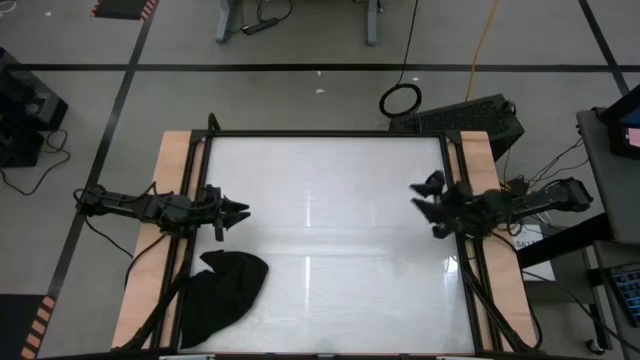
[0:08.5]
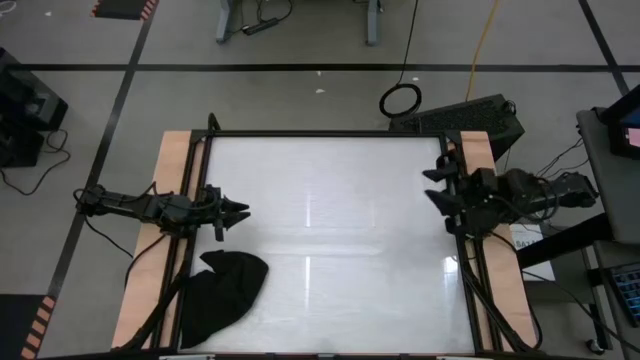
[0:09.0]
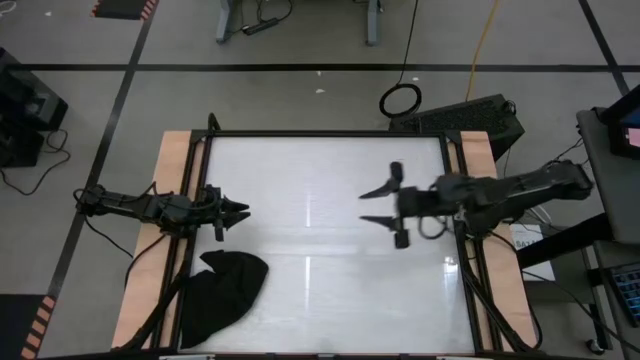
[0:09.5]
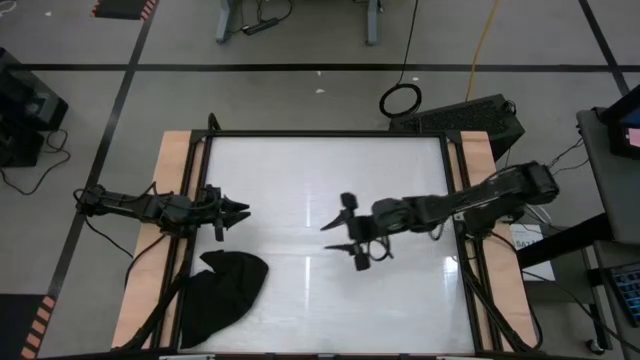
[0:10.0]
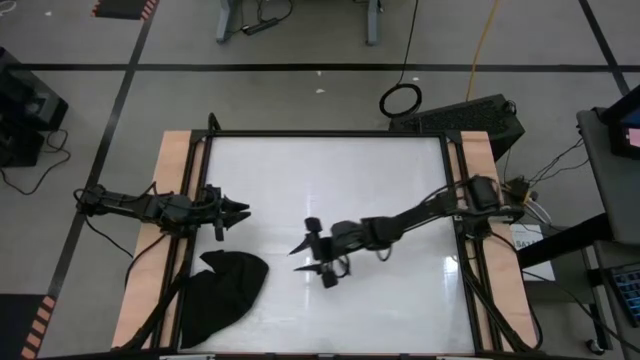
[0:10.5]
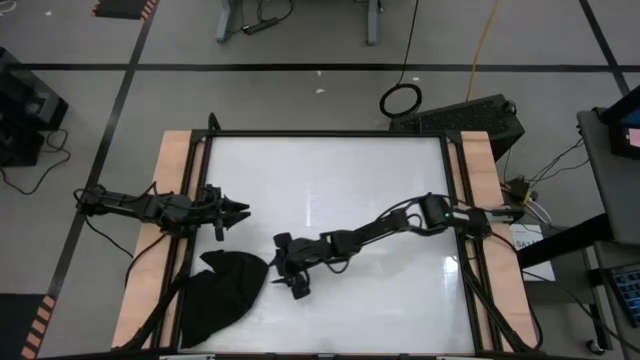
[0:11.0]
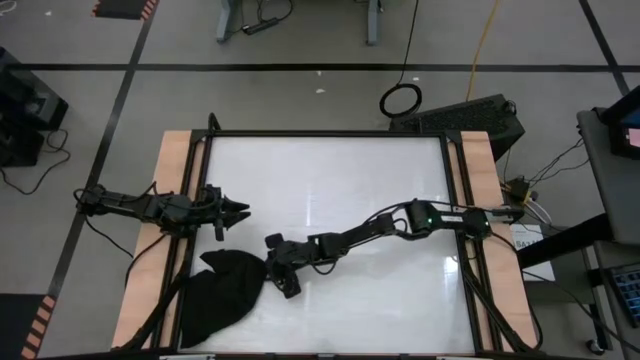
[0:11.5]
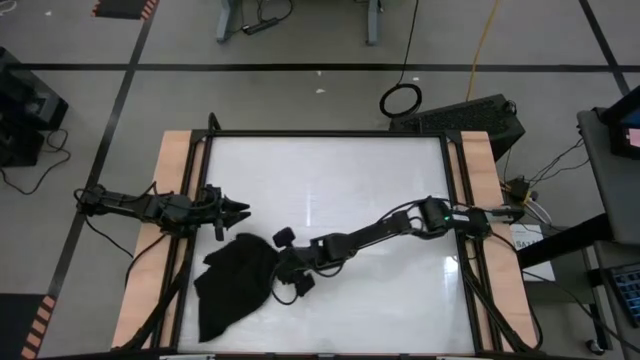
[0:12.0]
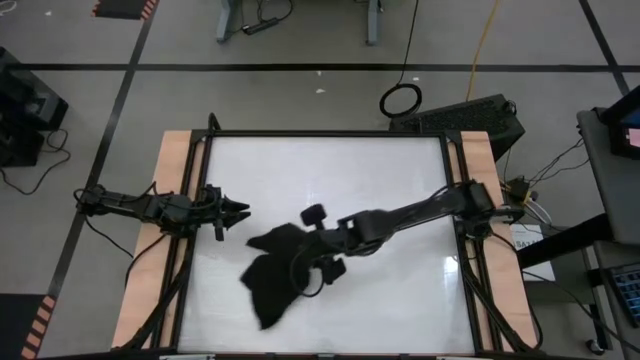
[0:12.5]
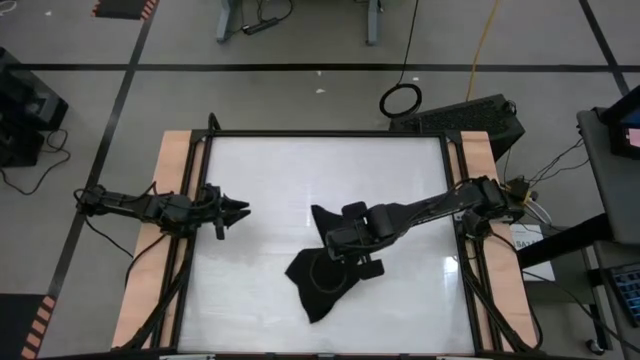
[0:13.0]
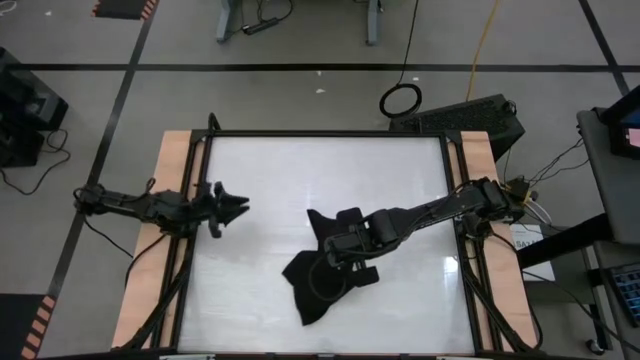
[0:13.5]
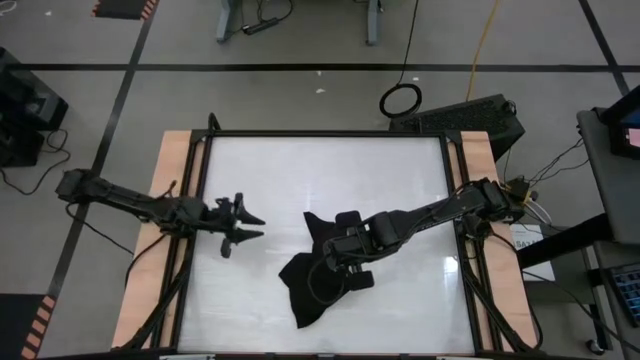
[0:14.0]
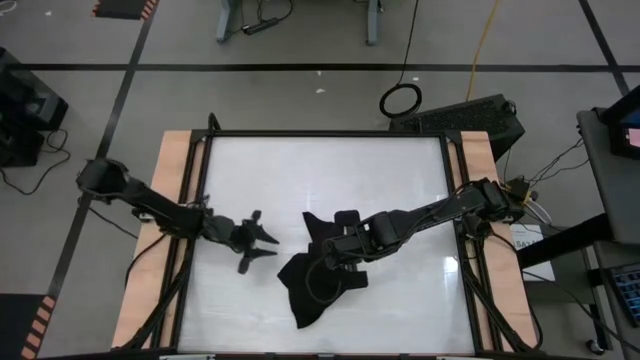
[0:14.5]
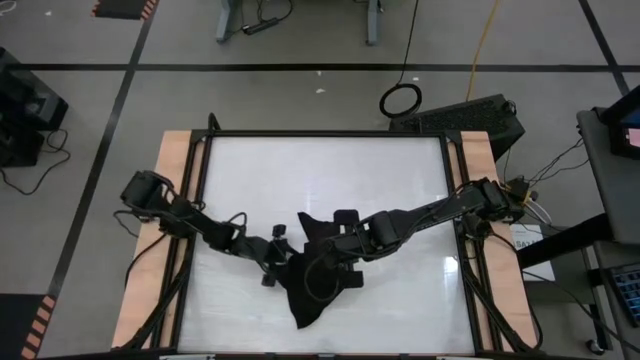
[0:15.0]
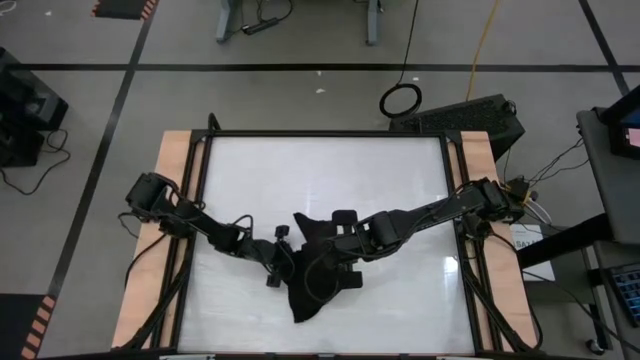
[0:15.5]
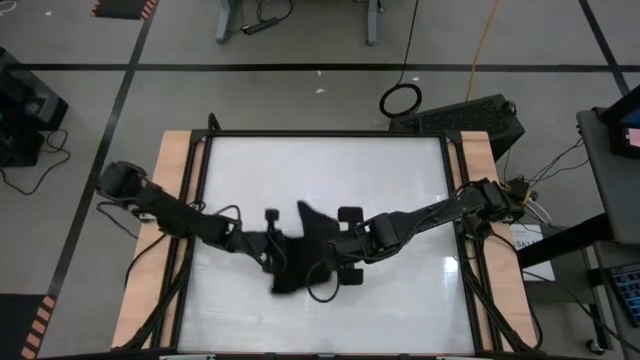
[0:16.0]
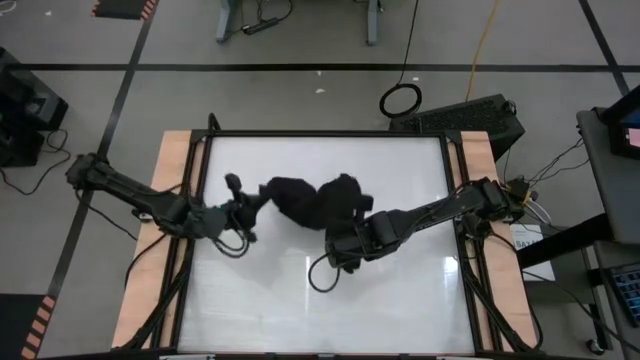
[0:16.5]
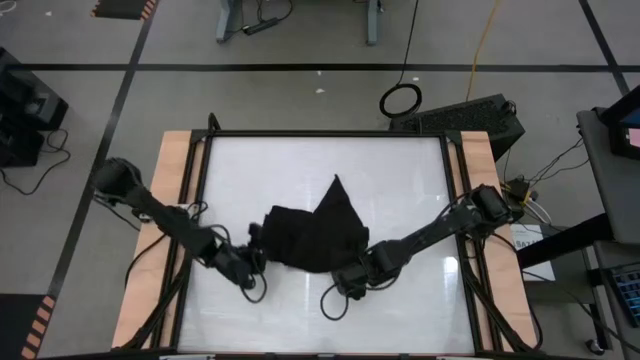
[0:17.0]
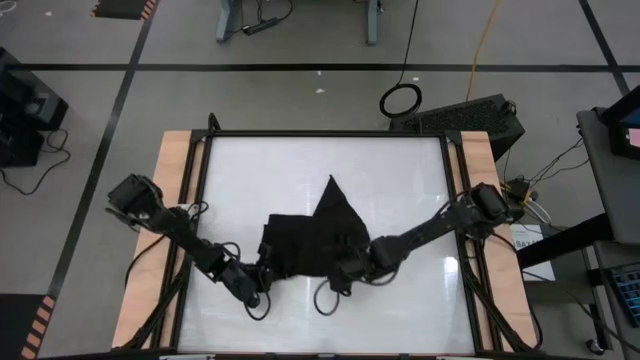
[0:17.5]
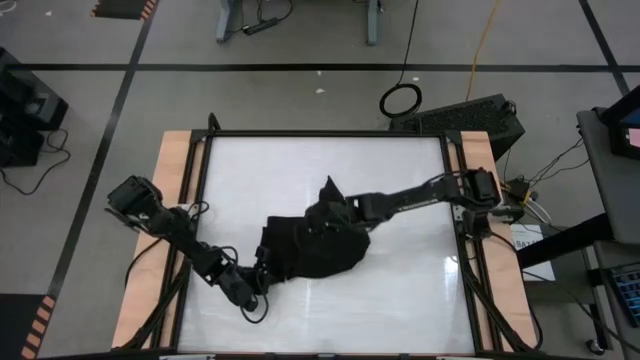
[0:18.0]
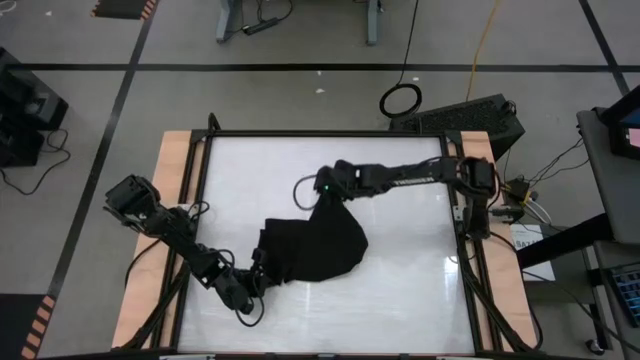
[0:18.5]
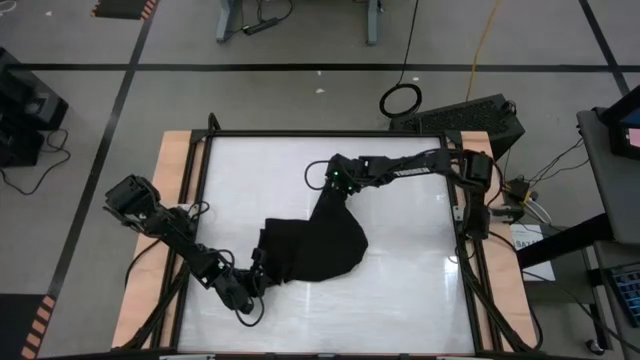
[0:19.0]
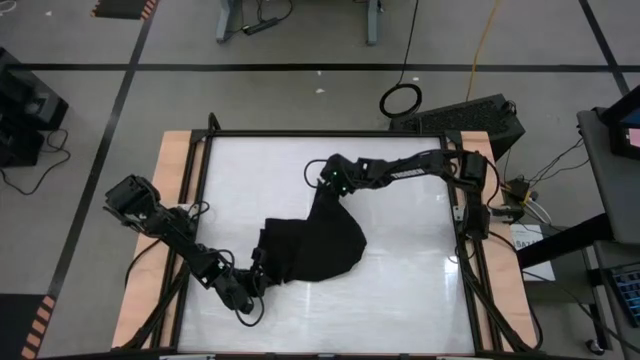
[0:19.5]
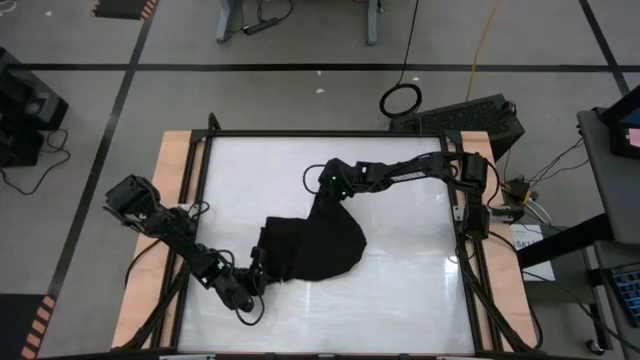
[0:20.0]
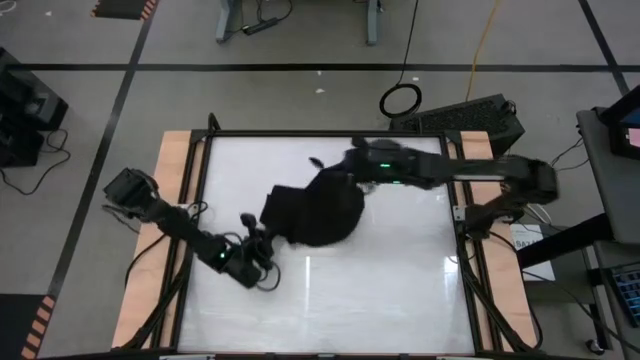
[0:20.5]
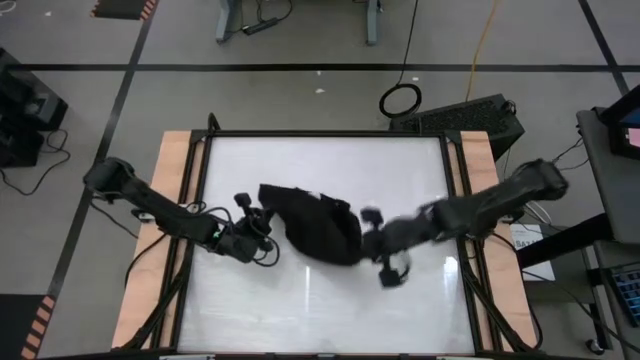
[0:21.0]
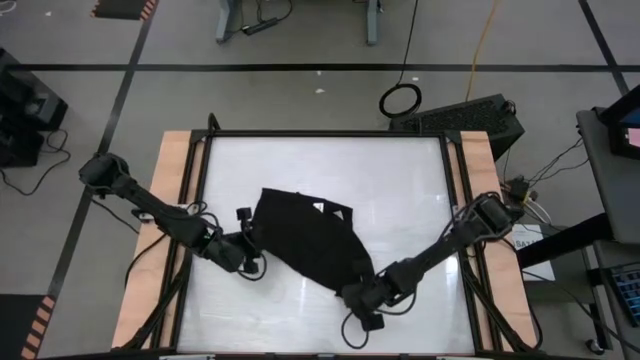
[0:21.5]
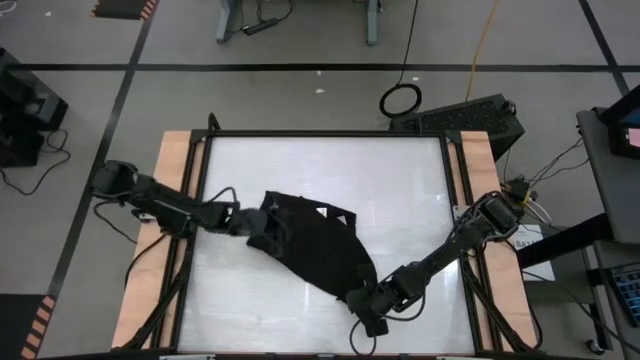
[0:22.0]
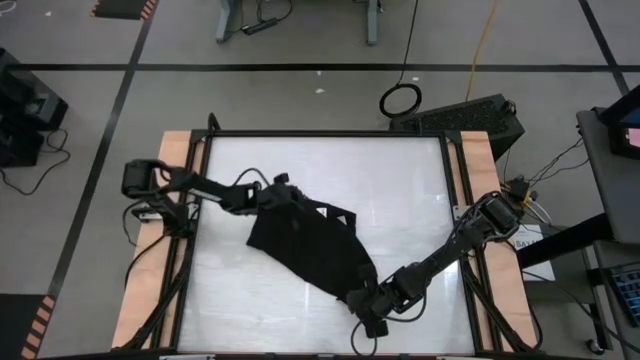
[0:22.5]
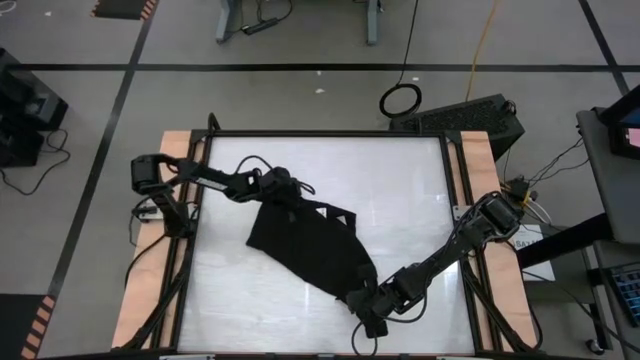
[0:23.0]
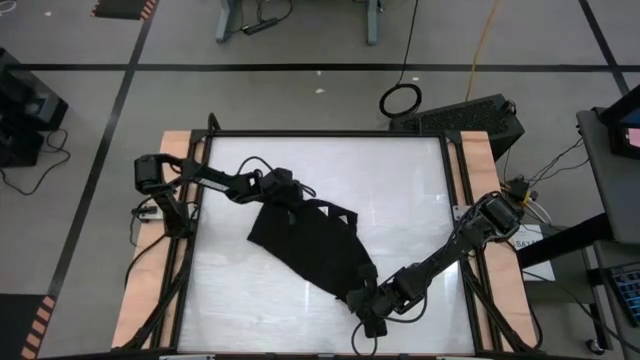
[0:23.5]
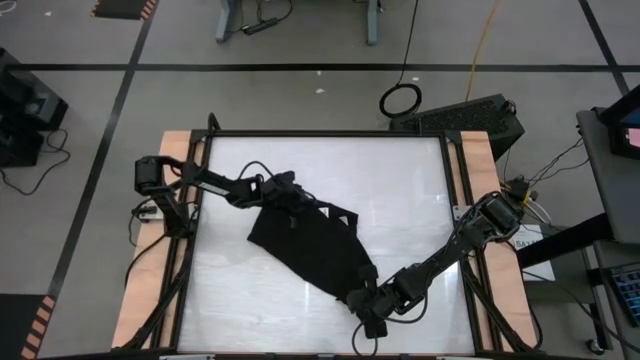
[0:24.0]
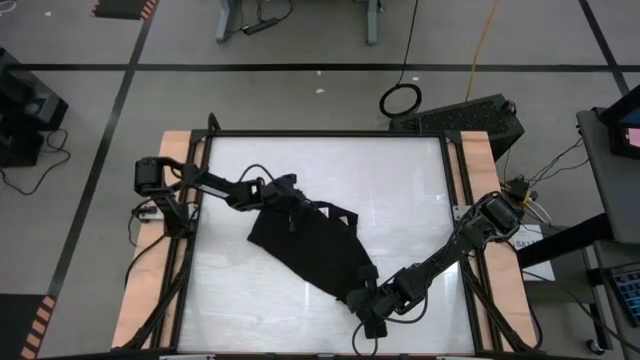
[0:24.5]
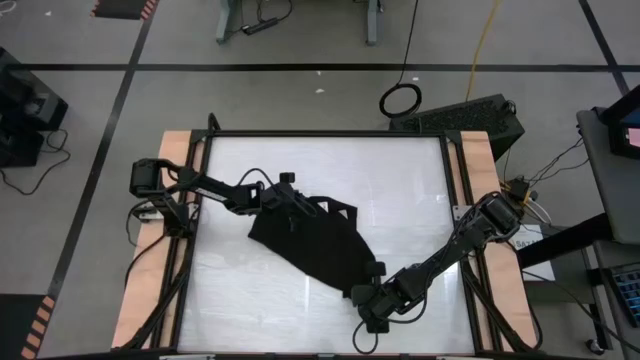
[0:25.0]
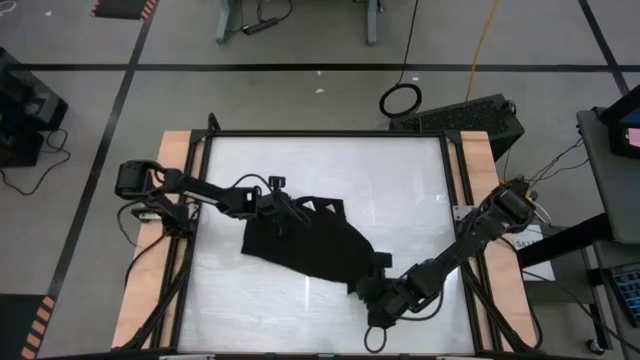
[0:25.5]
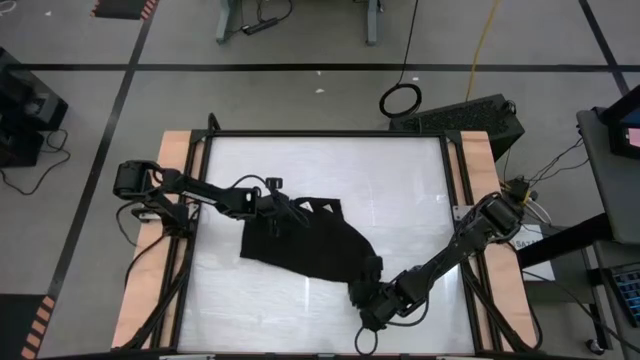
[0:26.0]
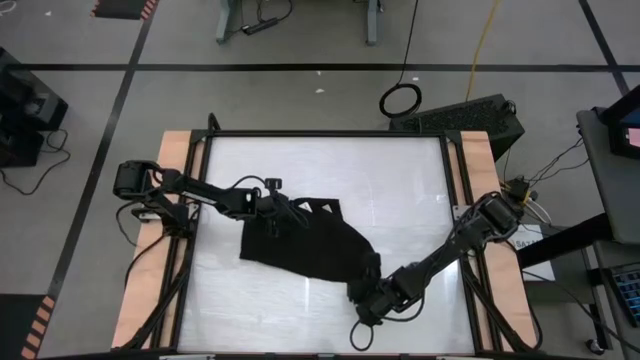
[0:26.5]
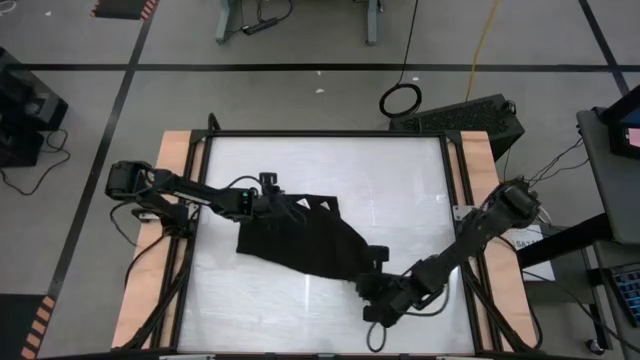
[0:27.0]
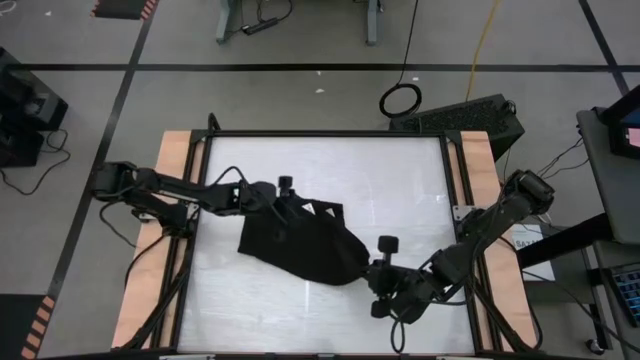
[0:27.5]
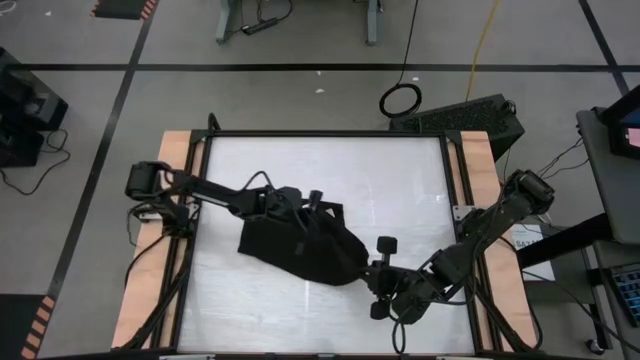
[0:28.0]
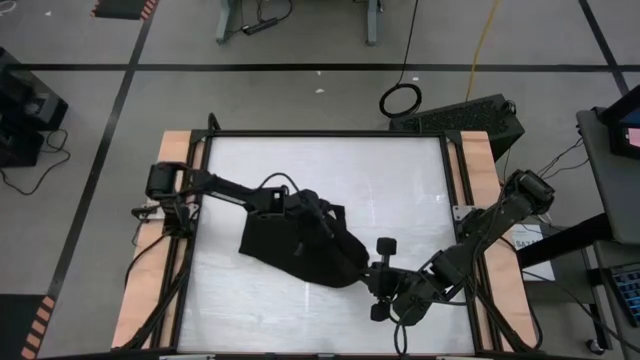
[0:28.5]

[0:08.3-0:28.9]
Task: Roll towel
Roll the black towel
